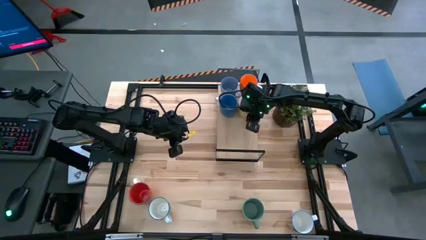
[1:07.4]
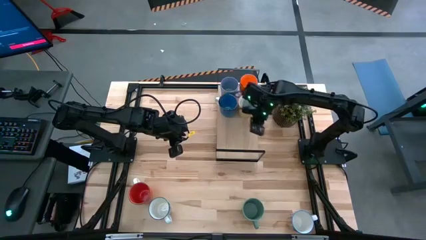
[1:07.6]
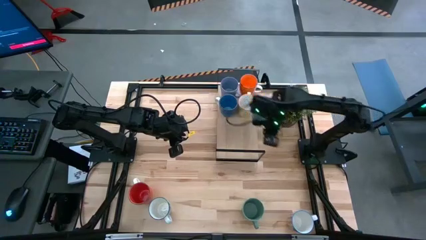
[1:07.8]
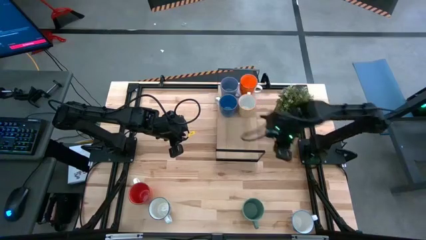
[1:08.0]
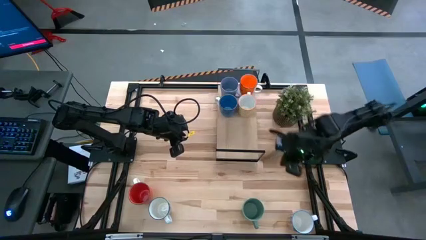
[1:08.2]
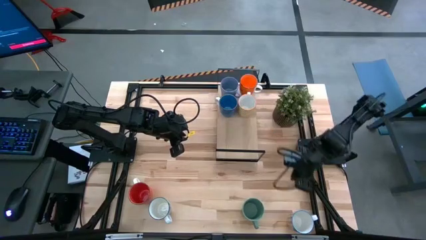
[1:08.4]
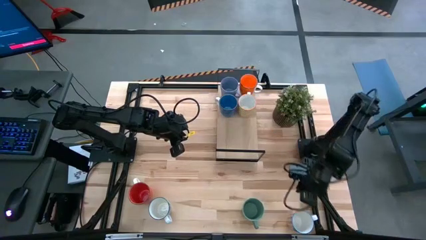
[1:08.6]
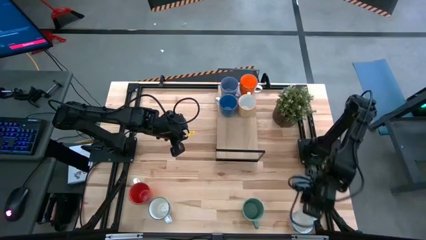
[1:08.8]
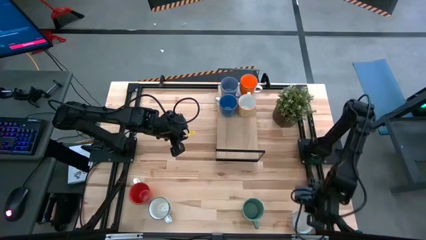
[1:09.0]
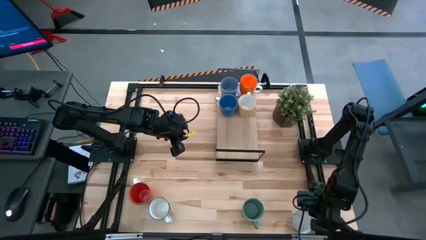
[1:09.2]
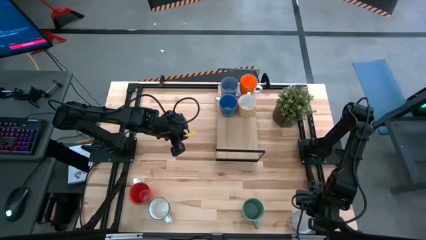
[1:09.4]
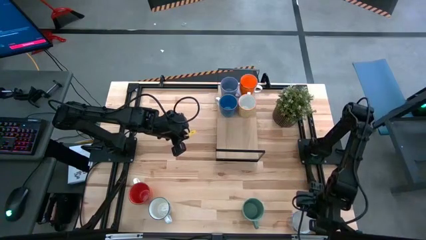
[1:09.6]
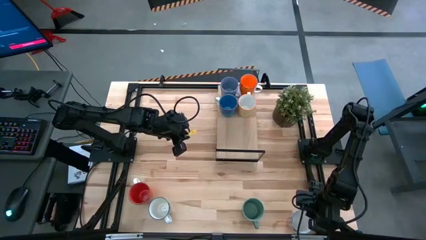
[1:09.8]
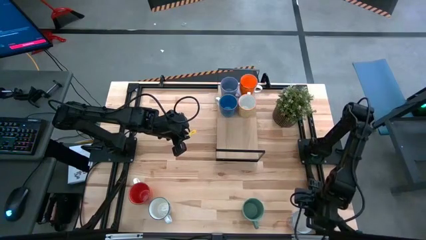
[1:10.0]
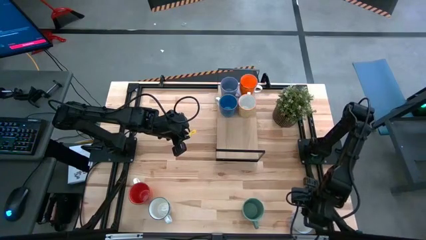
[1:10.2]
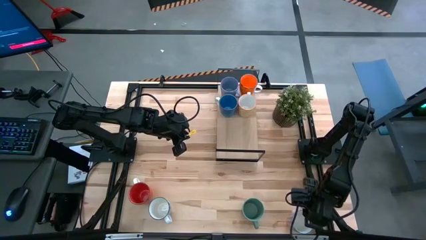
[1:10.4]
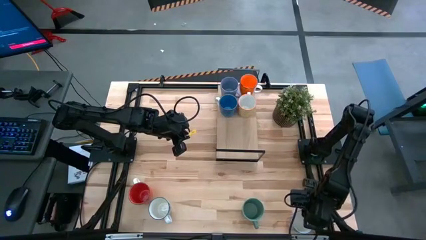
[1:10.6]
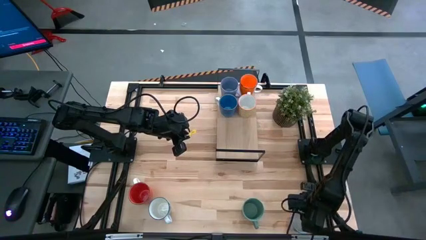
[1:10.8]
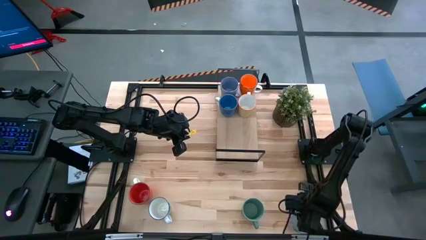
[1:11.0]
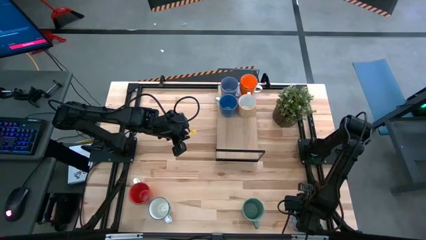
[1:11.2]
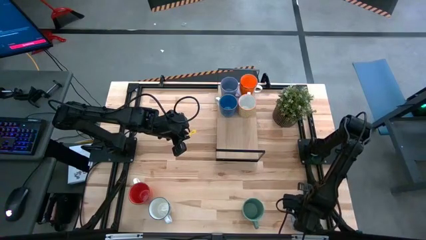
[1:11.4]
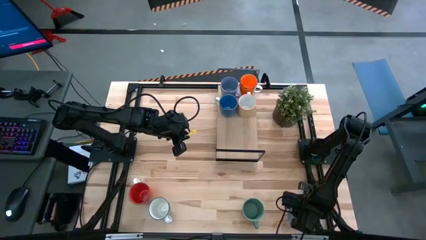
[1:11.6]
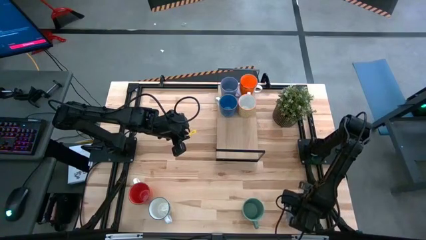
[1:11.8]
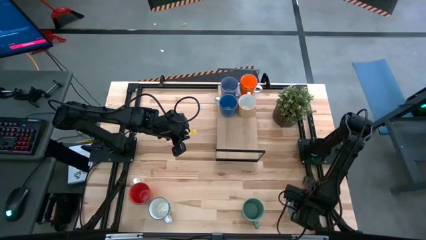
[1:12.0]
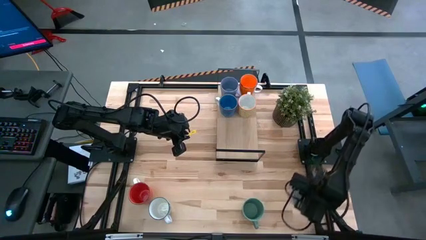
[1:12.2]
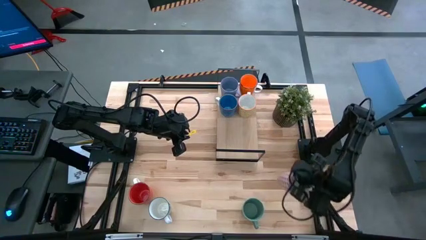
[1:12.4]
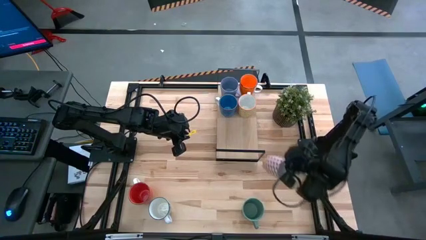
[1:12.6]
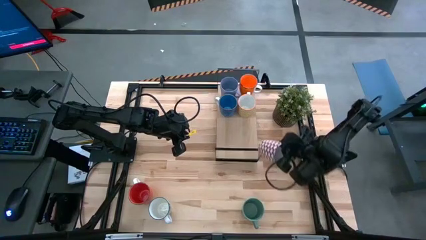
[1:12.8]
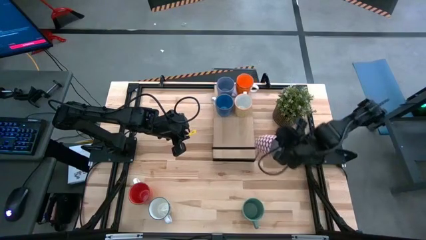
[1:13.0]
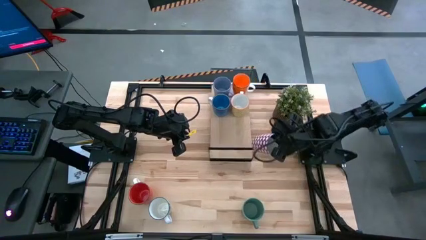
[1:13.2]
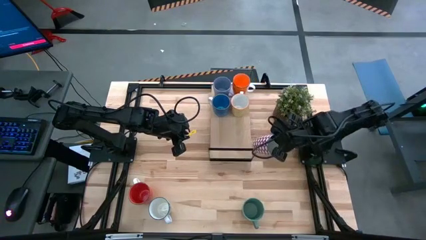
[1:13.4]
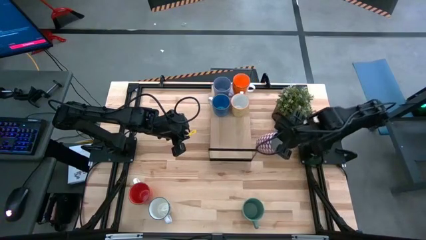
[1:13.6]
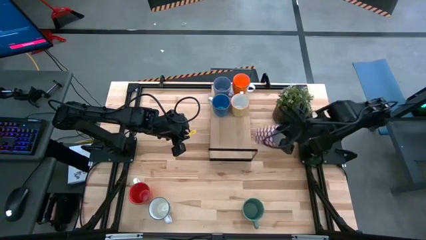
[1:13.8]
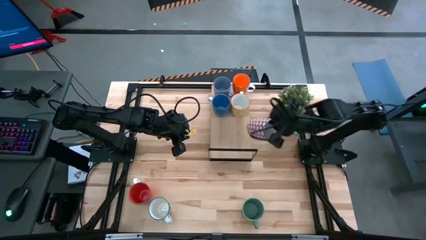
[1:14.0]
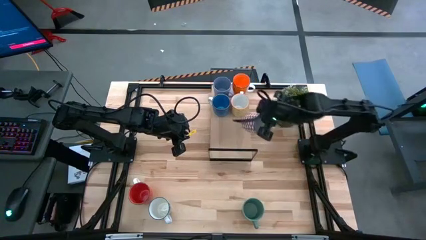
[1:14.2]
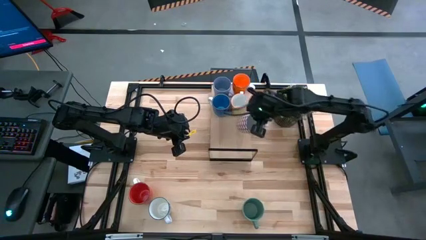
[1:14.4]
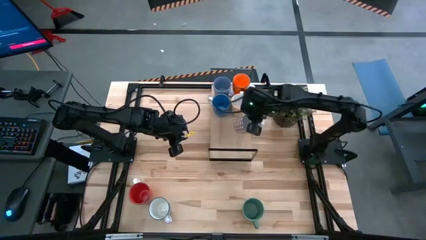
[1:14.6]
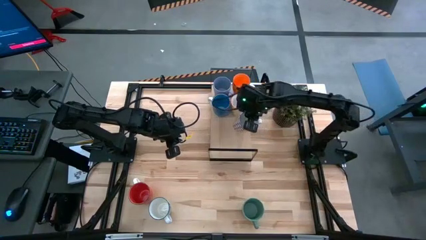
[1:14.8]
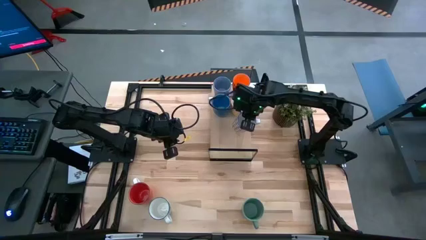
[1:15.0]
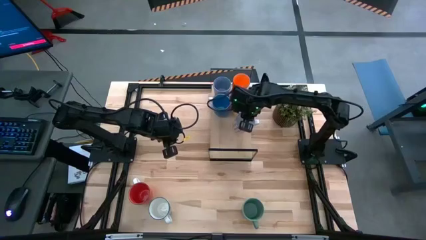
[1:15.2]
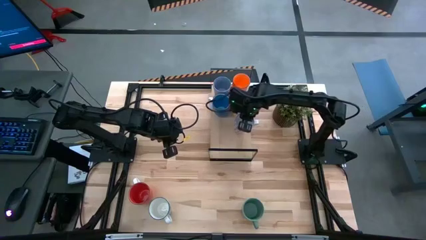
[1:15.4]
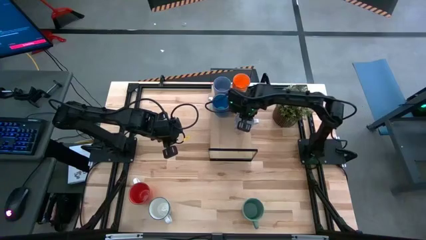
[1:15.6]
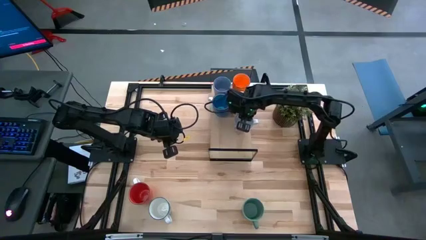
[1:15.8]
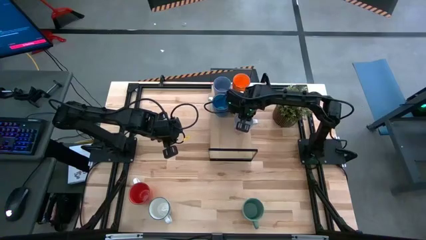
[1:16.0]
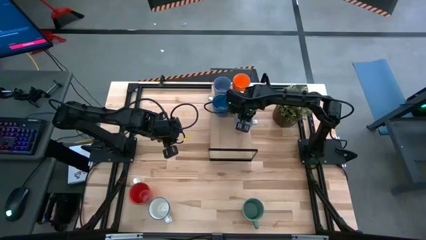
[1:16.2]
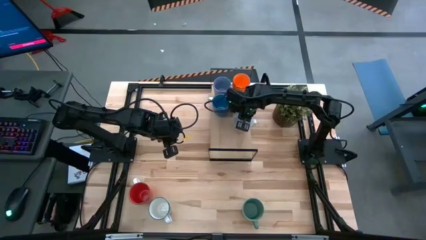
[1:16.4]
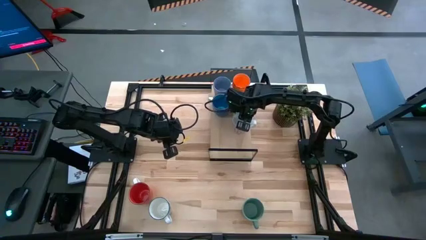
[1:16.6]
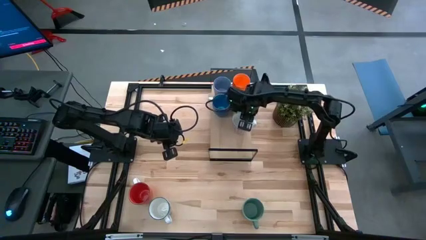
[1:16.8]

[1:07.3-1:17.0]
Task: Place coffee mugs
Put the red patterned mug on the shelf next to the yellow mug

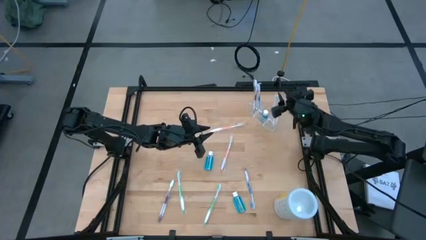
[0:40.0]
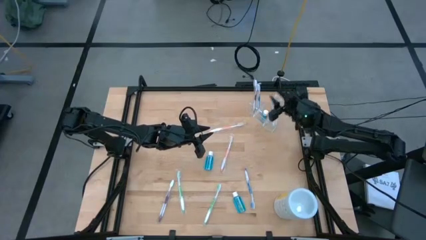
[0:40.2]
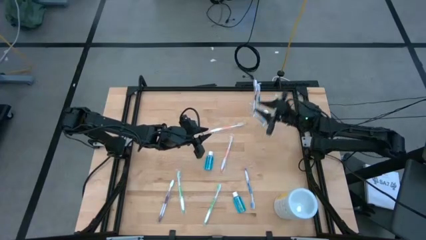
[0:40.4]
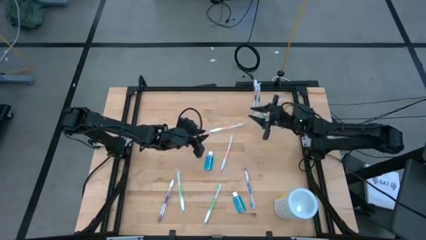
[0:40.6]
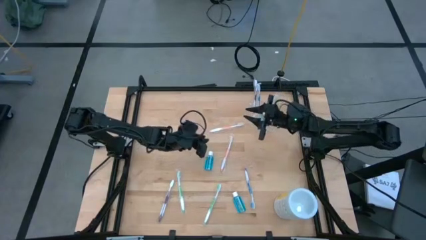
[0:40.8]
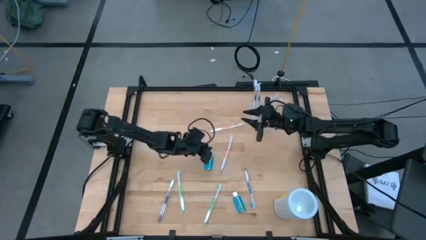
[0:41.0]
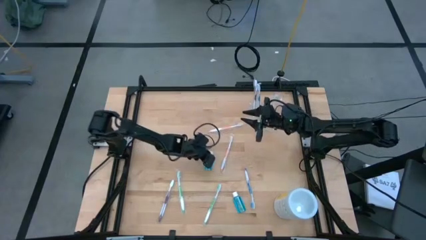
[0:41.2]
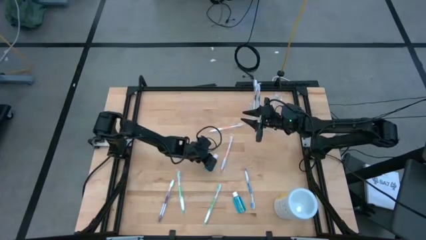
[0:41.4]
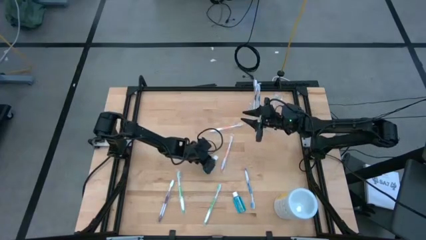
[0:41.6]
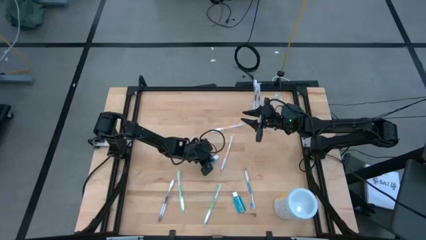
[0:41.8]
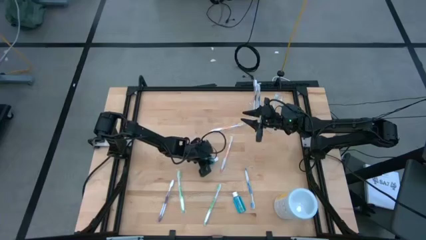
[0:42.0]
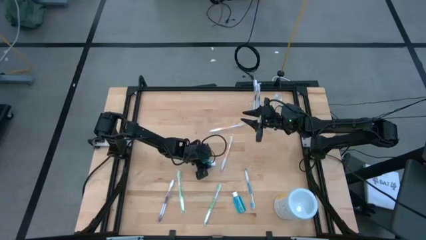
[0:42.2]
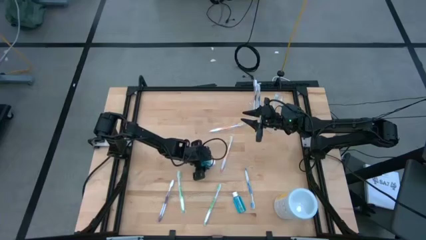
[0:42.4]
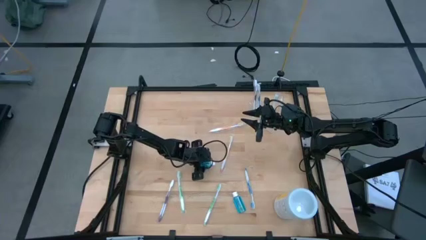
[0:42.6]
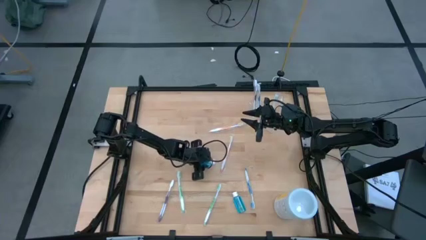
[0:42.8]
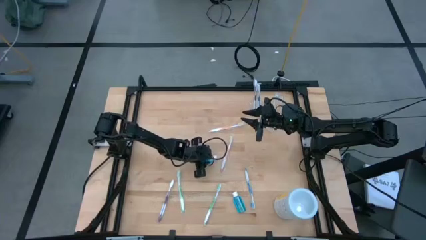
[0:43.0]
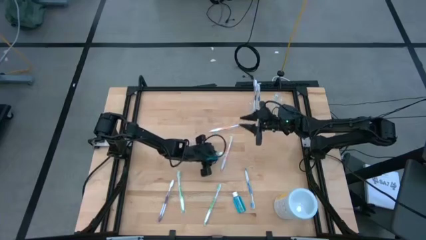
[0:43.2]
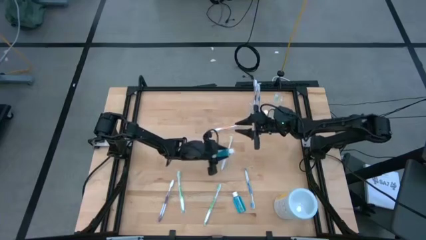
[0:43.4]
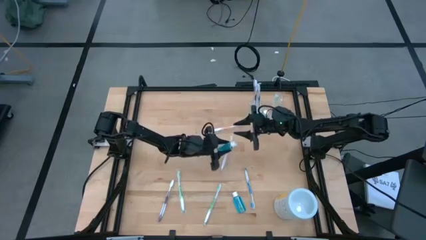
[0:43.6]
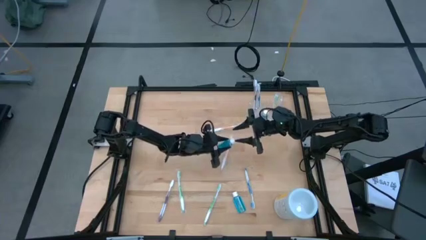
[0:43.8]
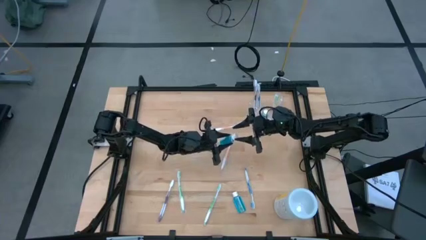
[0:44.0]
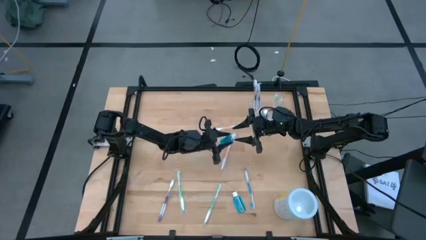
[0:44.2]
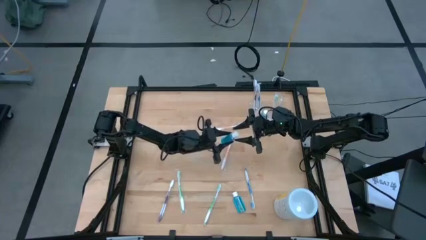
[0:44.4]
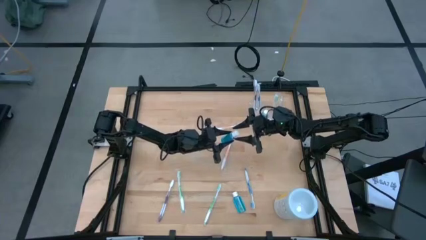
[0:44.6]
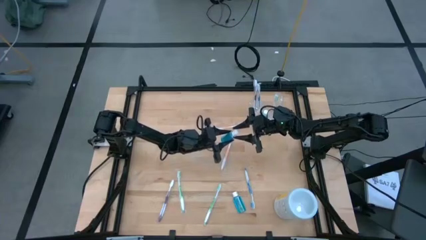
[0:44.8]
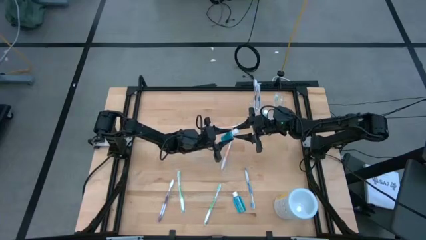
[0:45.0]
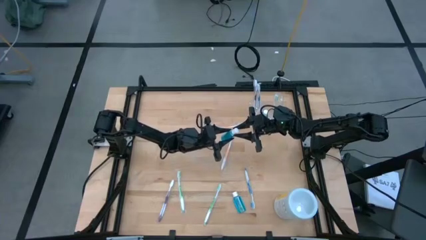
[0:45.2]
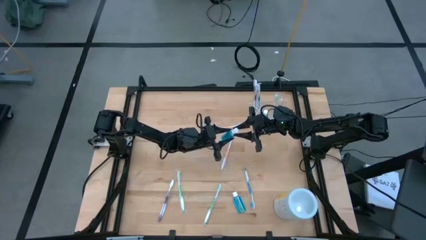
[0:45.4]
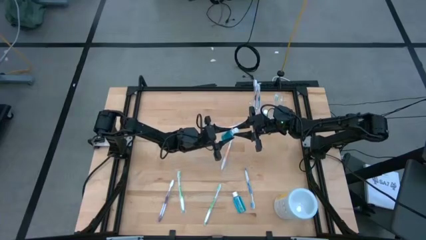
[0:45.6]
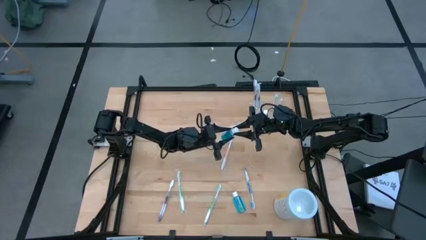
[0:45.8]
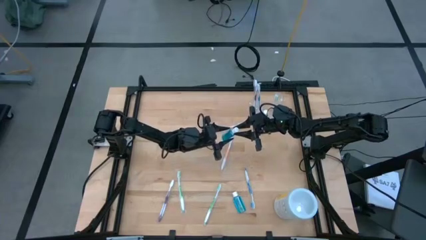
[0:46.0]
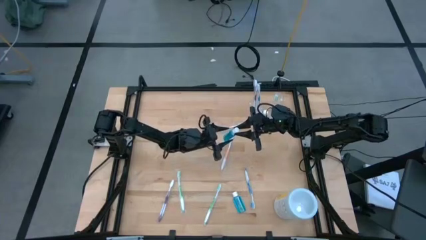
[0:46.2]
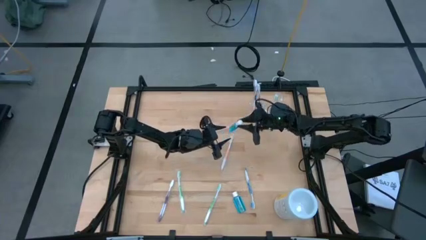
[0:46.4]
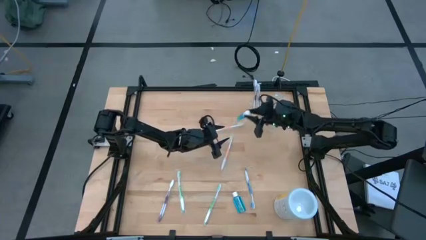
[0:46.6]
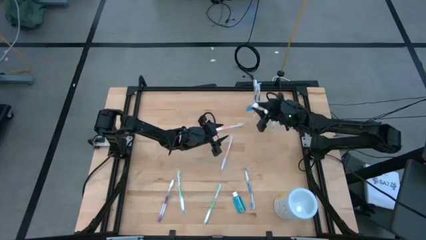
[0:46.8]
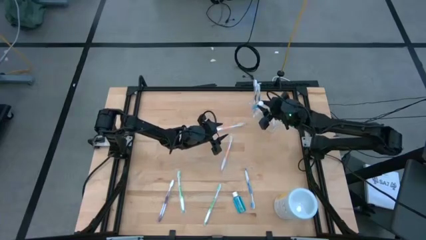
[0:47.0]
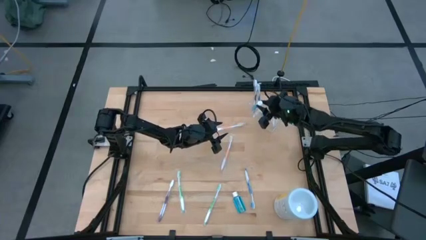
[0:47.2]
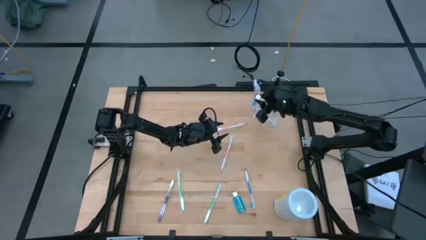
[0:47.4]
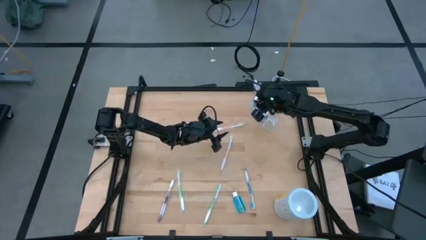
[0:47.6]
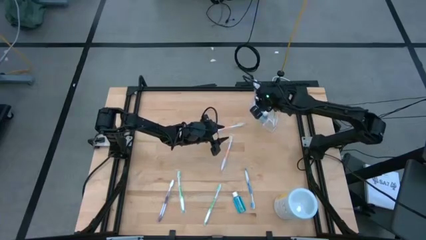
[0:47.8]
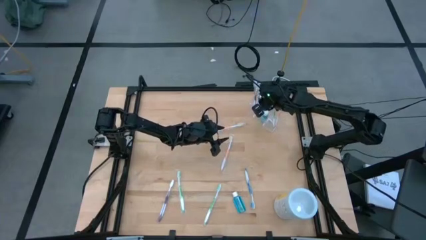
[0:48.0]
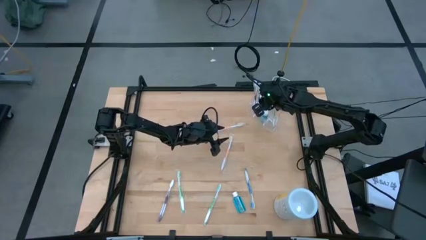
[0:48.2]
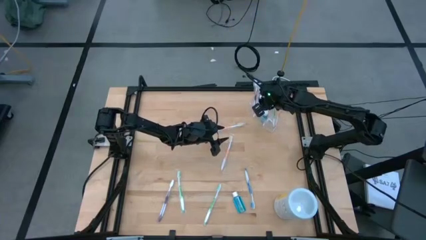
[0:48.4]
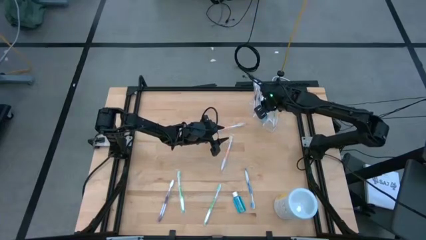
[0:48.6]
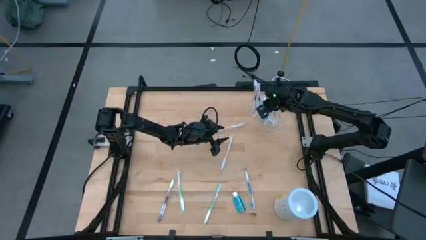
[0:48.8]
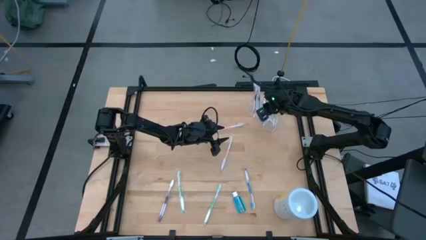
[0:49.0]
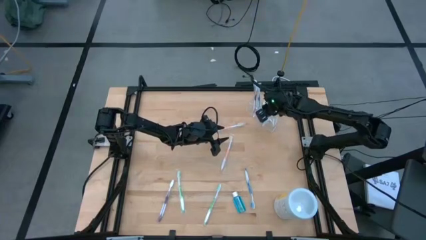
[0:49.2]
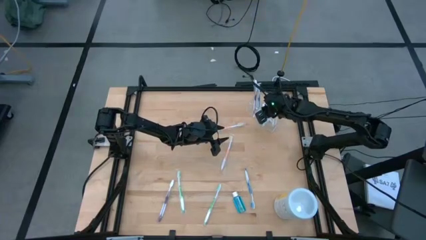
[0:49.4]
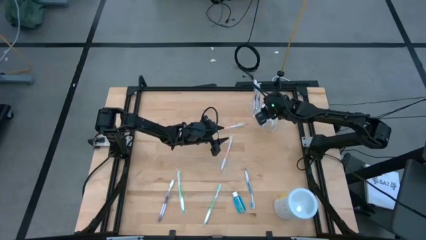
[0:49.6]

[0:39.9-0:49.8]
Task: Pick & Place toothbrushing station
Put the top blue mouthwash into the transparent organizer
